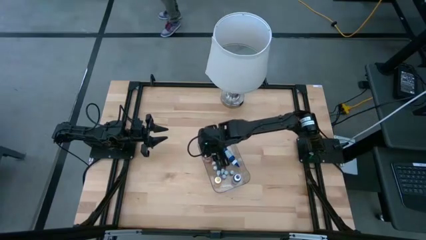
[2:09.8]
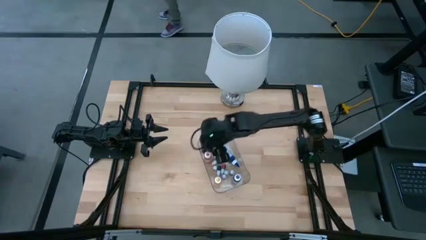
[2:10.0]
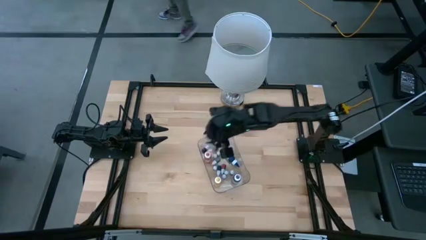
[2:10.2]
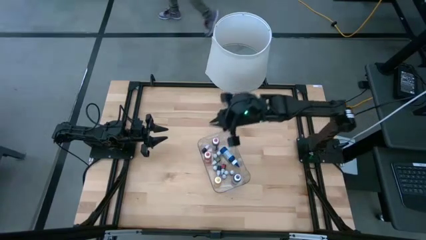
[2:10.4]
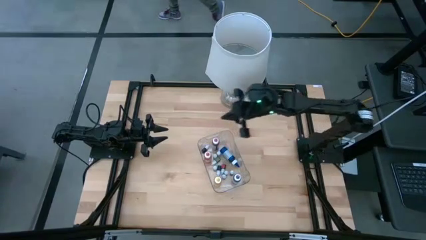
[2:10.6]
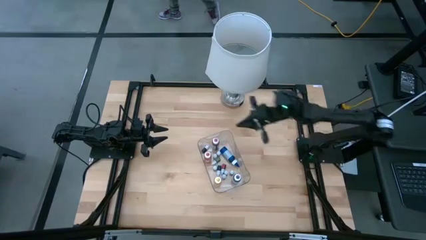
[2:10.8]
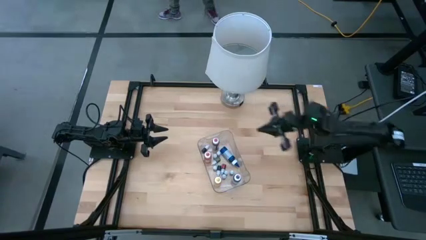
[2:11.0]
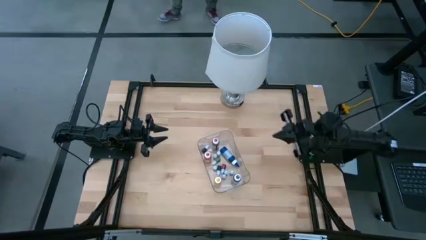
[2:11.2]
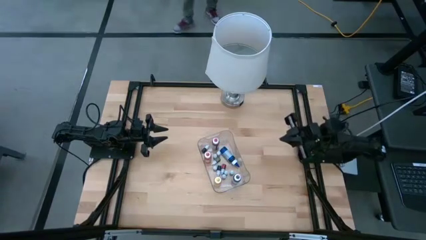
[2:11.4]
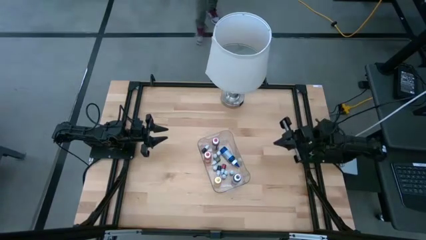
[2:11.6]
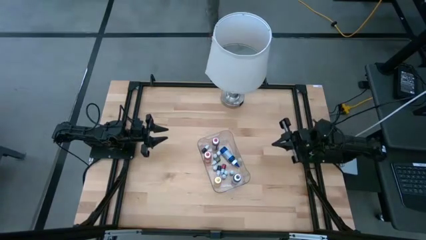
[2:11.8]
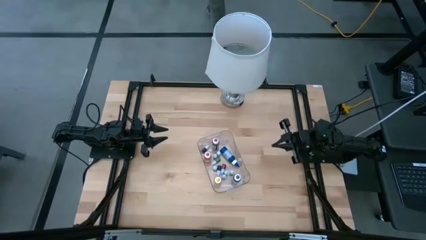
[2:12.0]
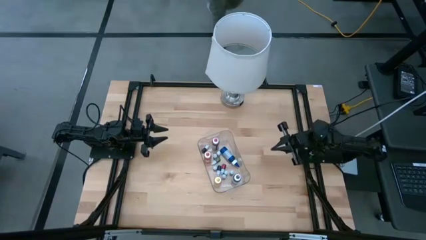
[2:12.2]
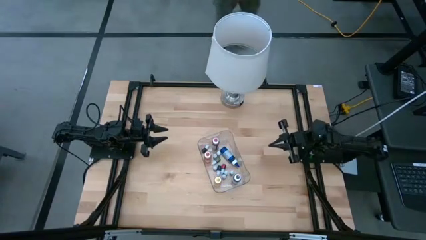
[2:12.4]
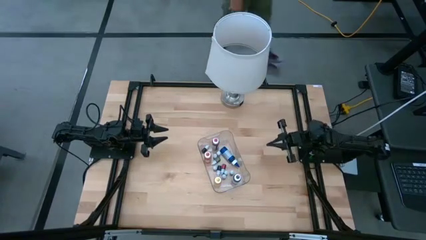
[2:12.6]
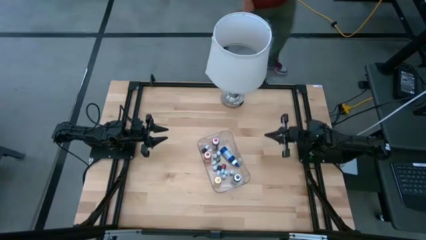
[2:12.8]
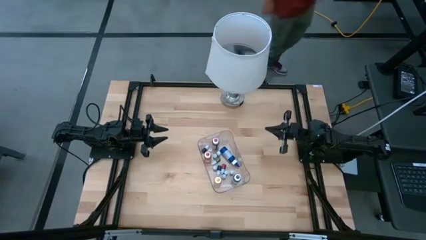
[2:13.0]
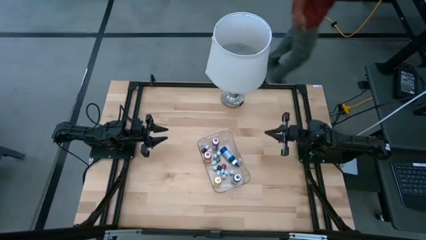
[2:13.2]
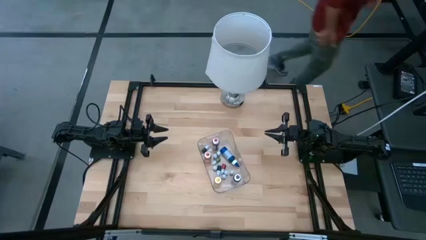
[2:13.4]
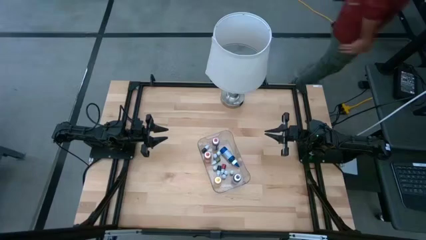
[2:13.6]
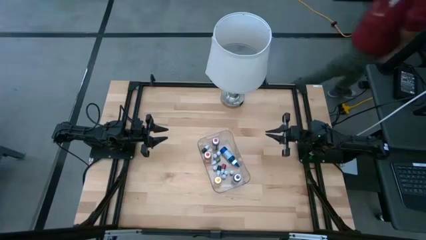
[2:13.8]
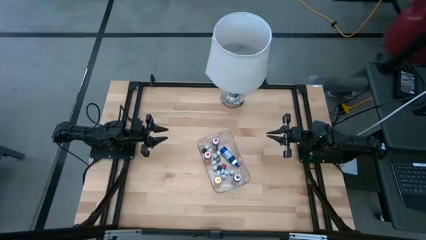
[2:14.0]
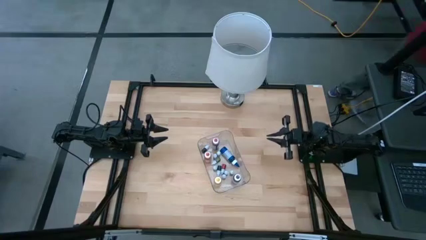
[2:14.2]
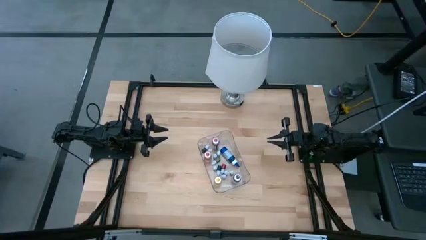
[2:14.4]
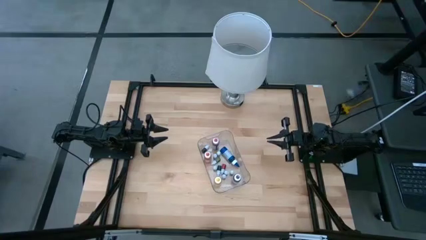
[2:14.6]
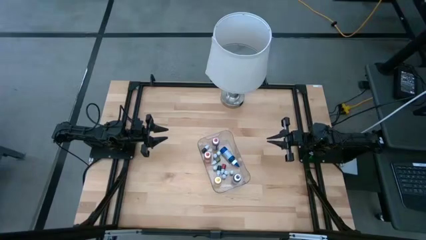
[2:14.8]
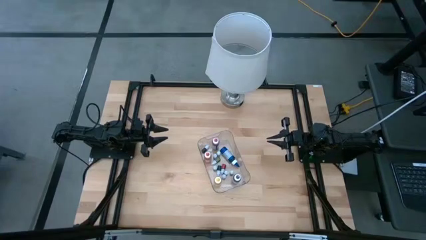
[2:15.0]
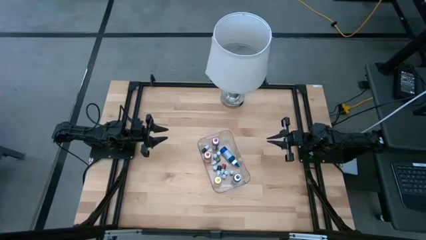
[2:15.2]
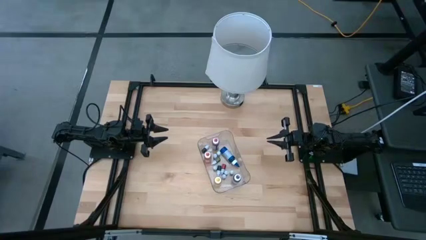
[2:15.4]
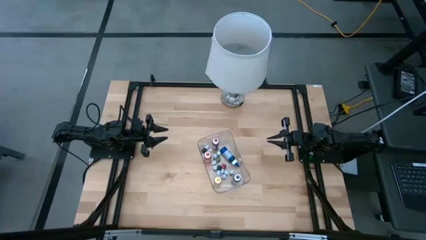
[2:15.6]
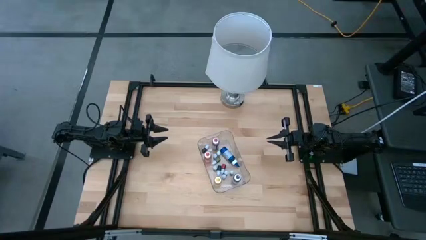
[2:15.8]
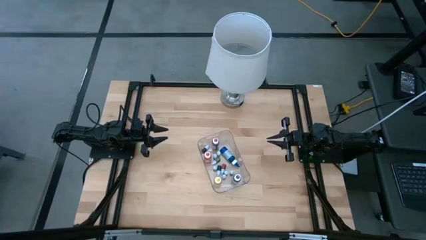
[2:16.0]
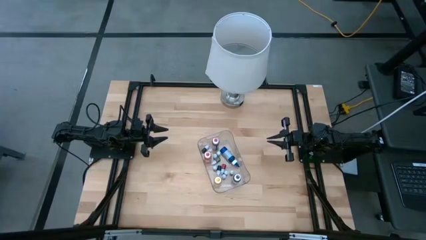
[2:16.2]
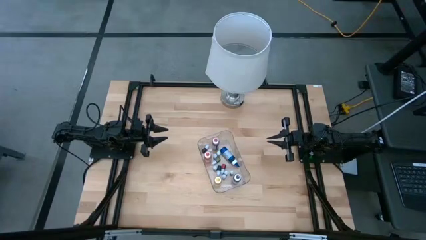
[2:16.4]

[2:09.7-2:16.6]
Task: Pick & Place food coloring
Return to Home Position

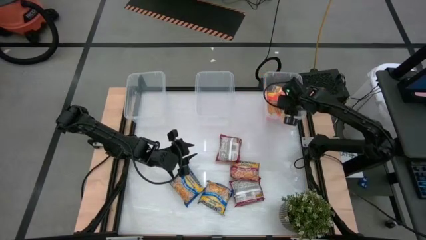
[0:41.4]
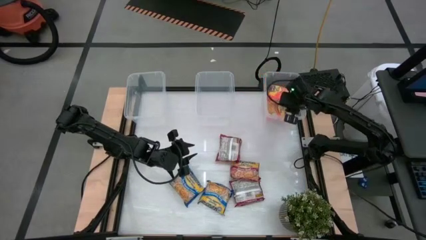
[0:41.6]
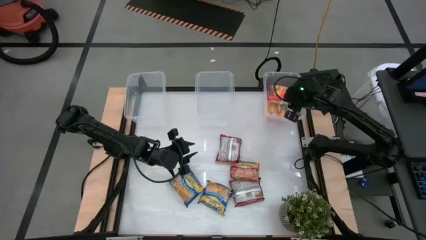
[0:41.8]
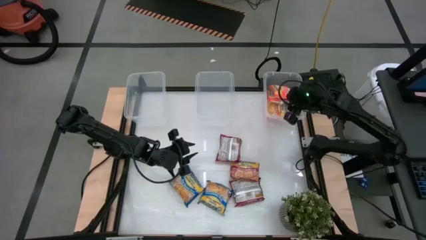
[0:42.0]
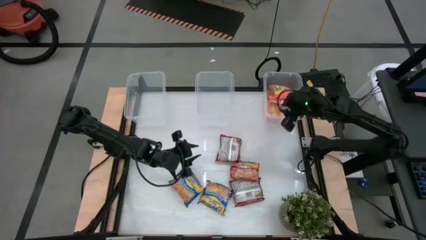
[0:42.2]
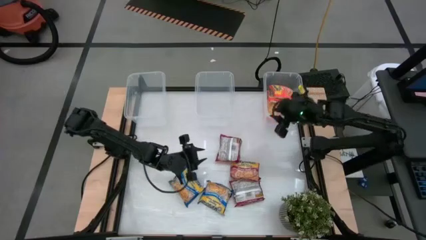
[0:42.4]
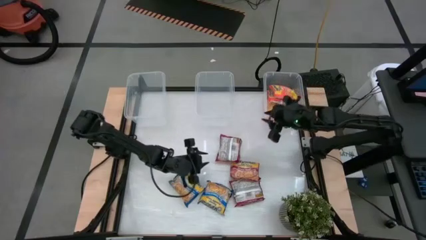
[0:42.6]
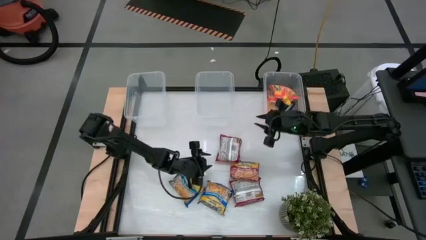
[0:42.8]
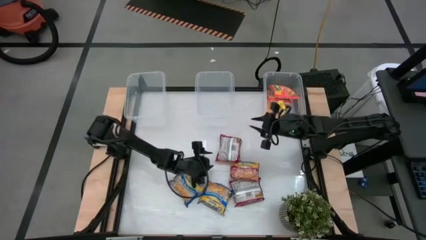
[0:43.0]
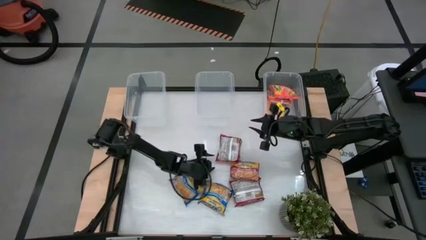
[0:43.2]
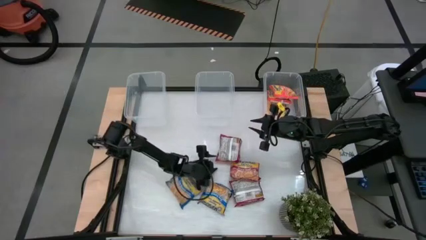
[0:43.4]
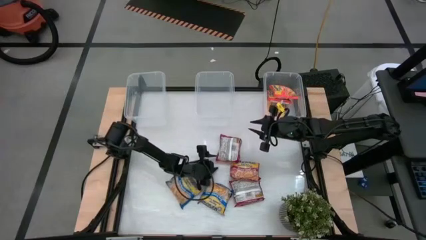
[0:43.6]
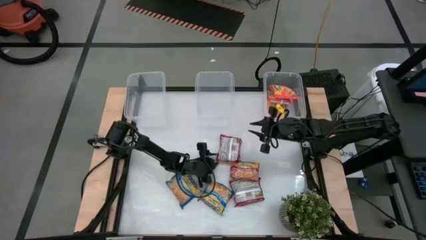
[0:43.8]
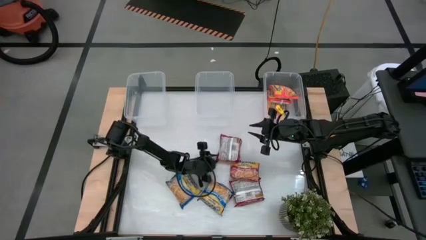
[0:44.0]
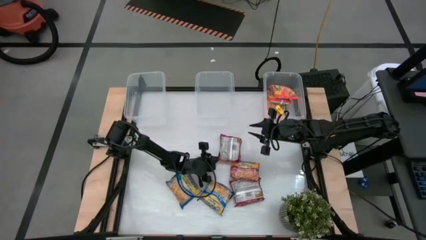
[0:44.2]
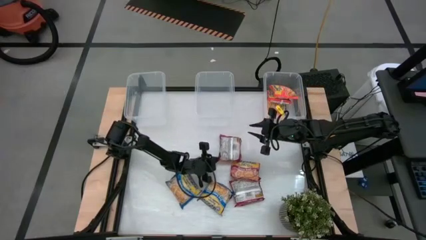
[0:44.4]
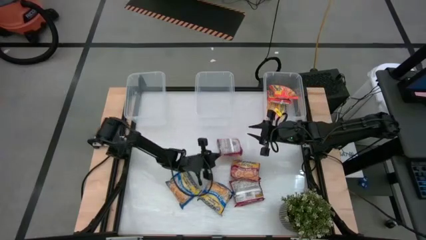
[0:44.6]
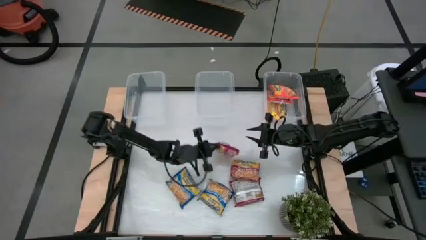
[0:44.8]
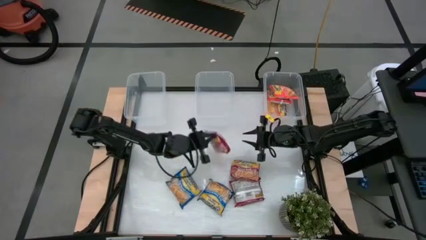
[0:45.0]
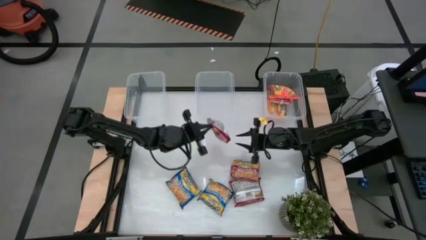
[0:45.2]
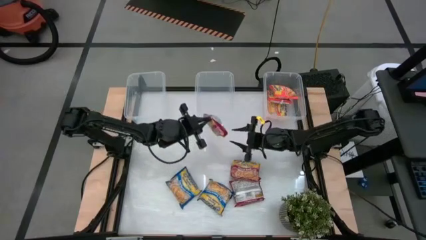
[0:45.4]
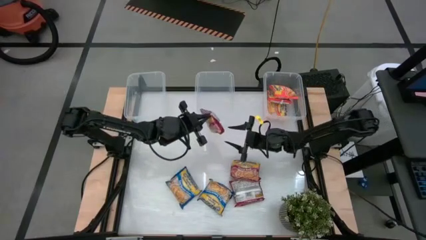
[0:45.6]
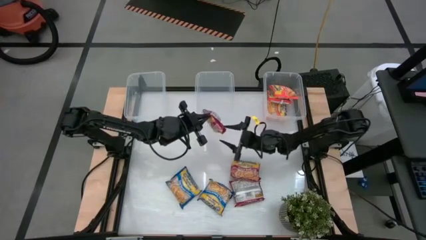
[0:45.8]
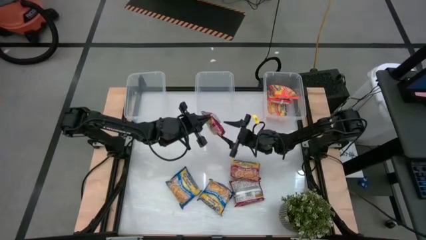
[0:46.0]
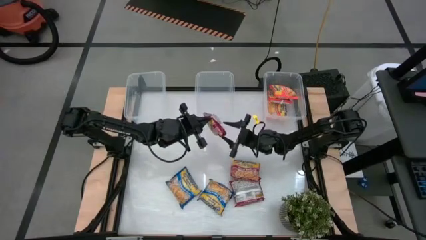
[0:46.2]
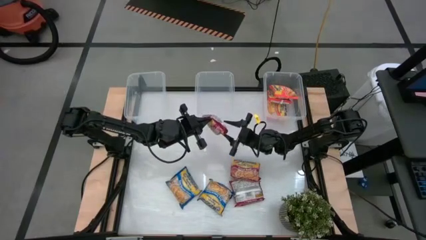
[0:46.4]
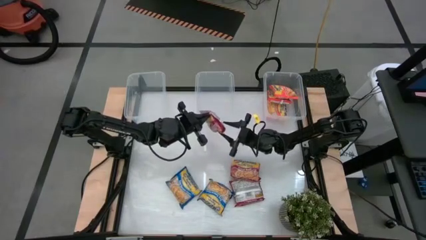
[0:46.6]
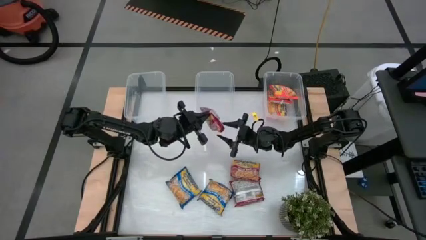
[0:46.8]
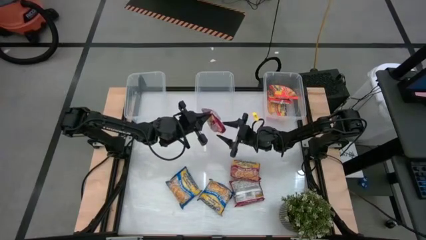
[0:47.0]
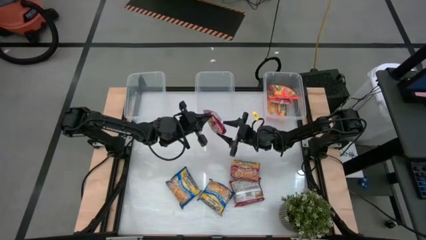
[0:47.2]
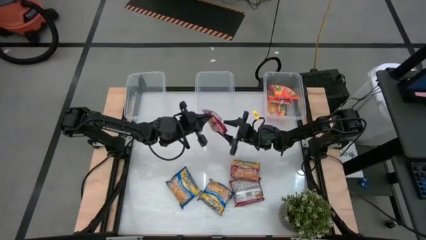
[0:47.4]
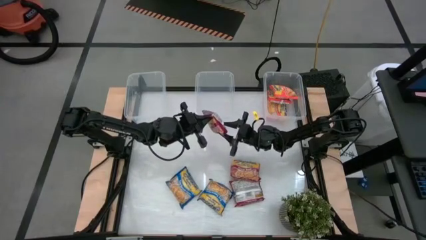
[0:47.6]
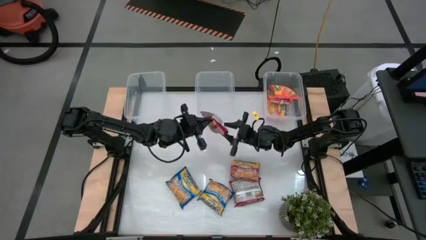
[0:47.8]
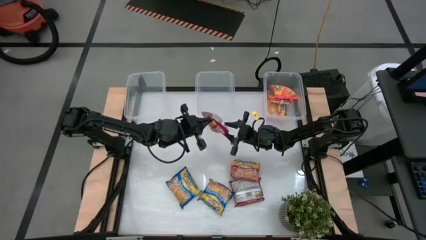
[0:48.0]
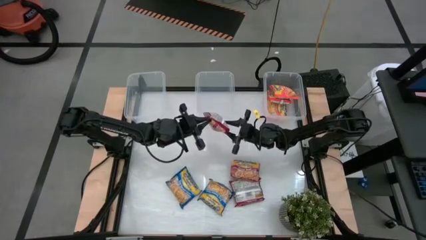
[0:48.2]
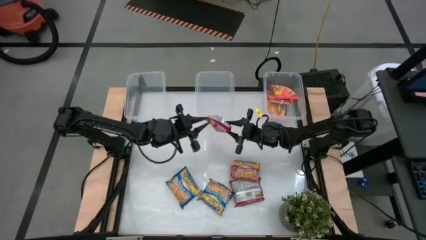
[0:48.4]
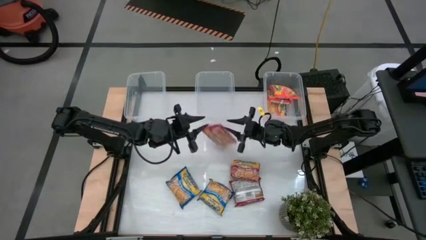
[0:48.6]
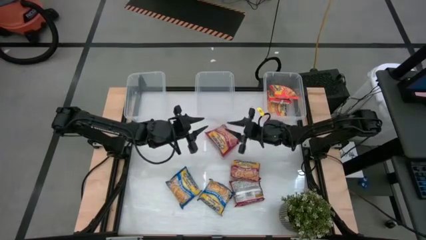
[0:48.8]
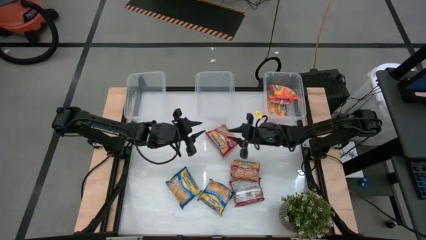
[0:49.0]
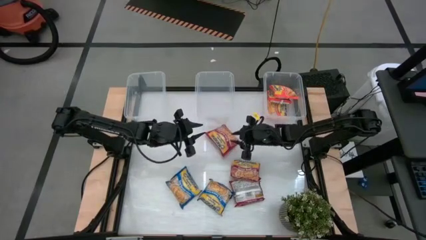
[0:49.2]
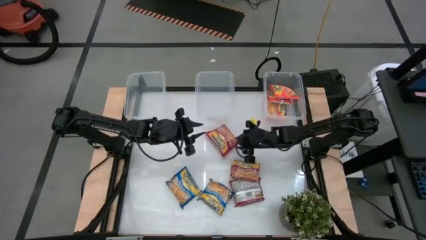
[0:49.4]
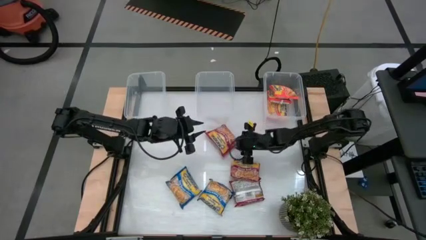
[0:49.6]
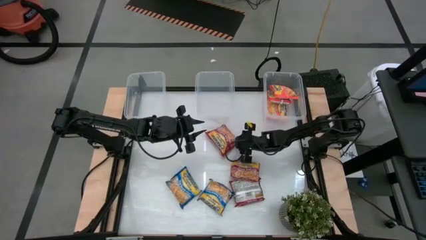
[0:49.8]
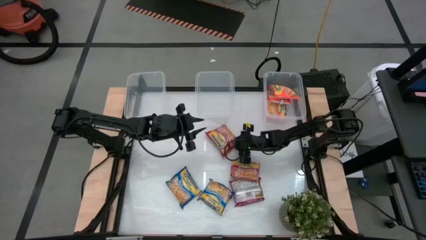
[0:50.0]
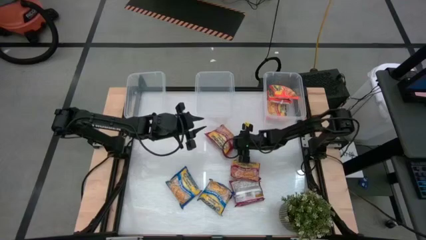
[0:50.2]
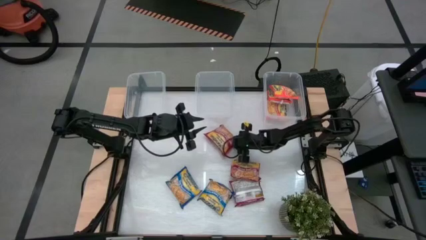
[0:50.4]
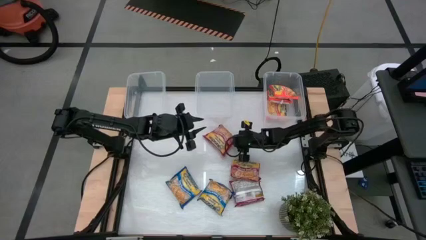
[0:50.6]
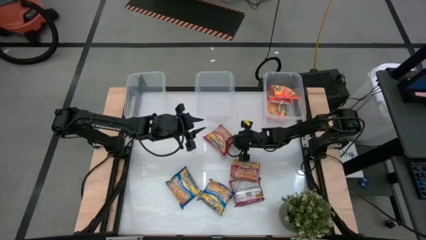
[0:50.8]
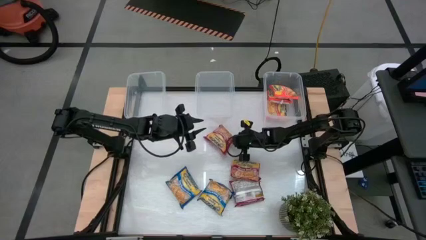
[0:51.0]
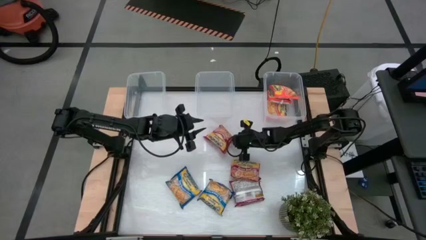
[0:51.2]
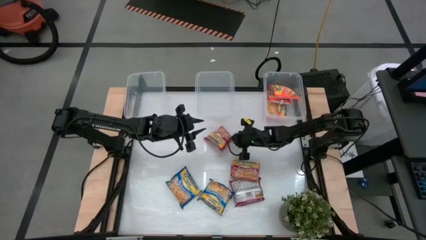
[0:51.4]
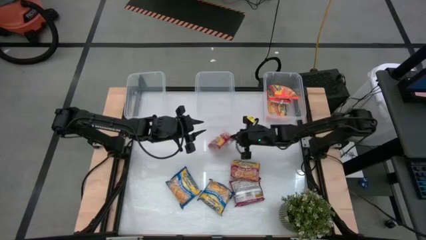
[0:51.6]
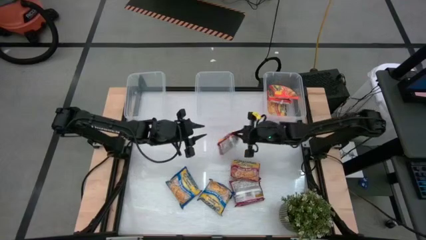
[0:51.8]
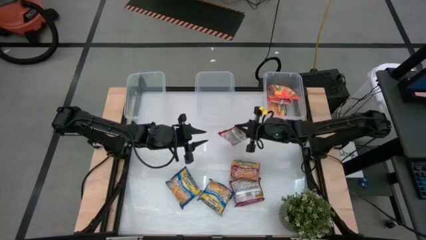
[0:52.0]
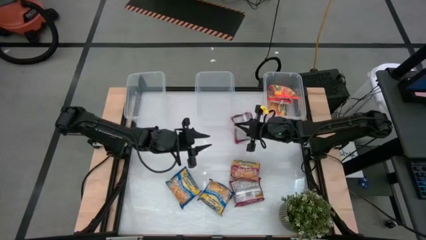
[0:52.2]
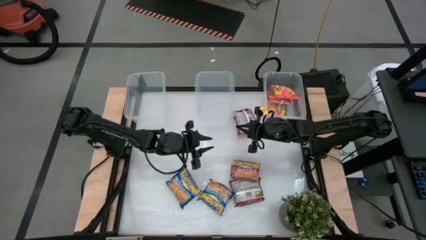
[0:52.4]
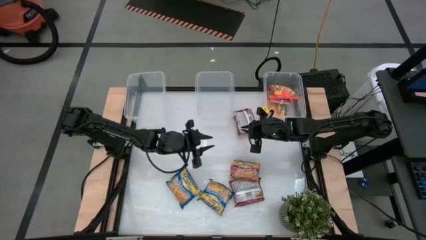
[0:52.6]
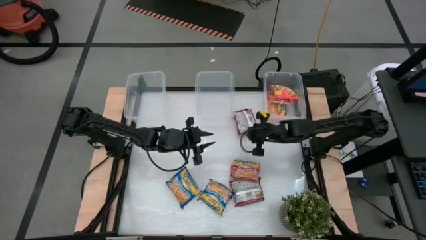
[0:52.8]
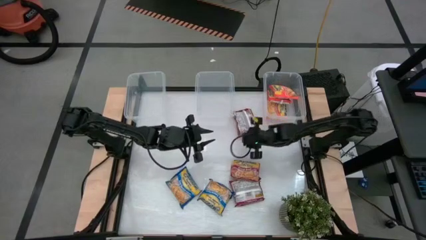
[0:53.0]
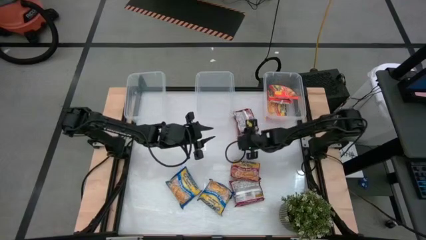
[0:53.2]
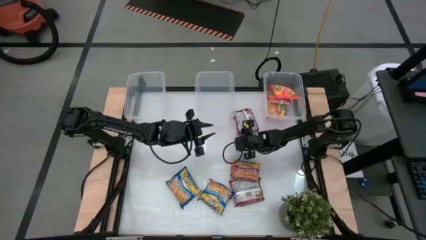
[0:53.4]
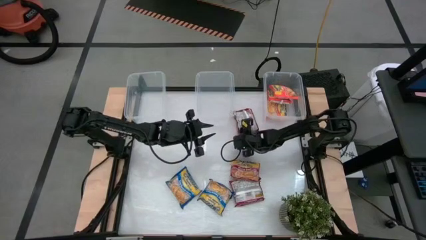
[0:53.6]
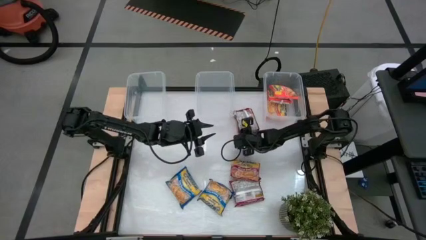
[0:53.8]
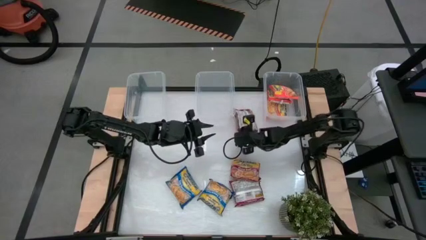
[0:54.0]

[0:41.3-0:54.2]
Task: Sort Maruchan noodles
Put the top red noodle pack into the middle transparent bin
